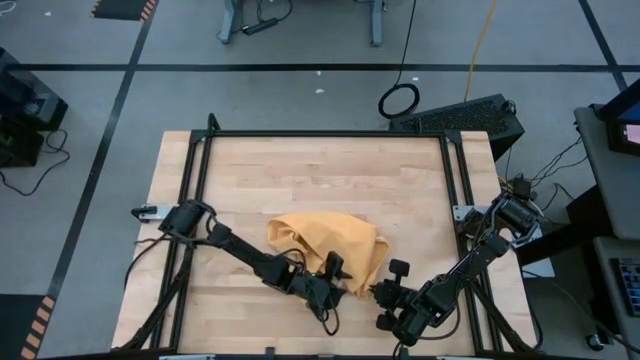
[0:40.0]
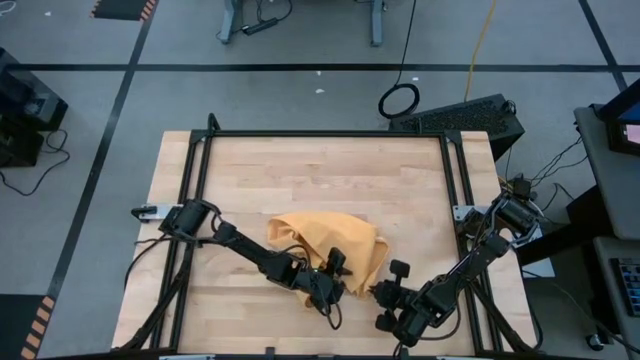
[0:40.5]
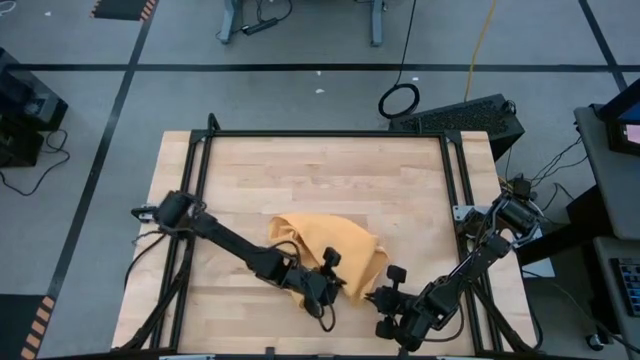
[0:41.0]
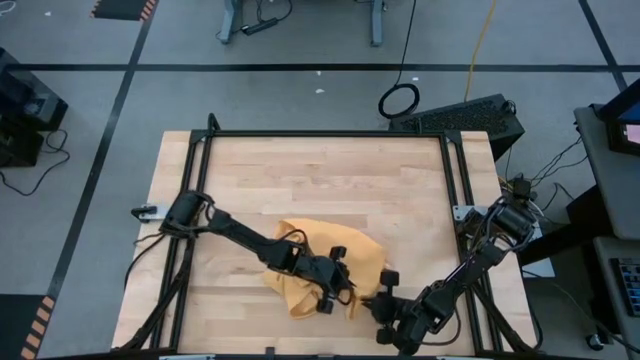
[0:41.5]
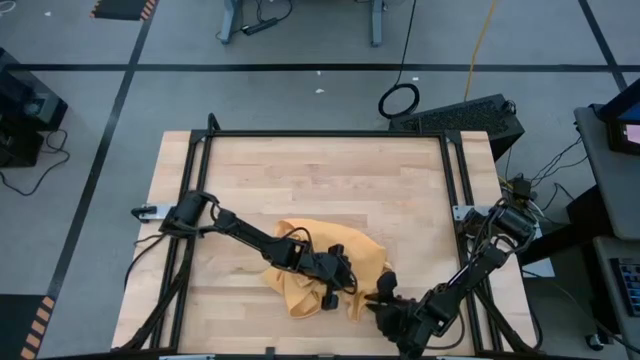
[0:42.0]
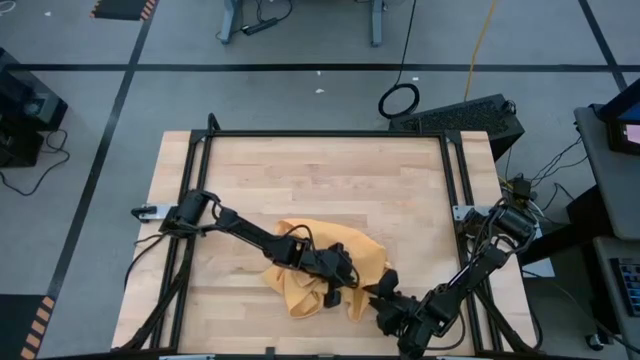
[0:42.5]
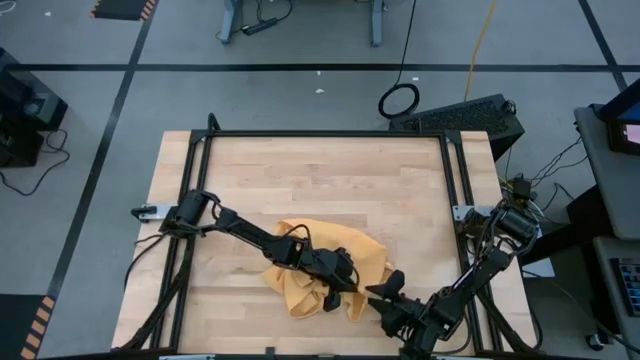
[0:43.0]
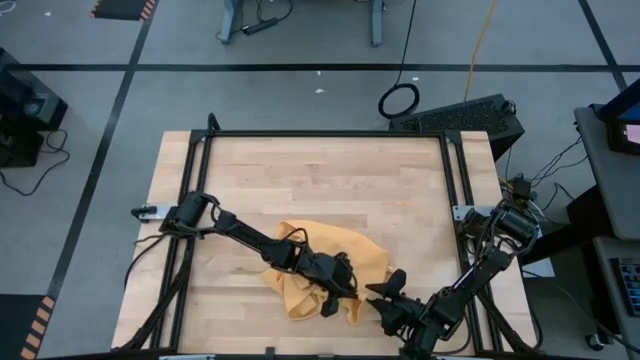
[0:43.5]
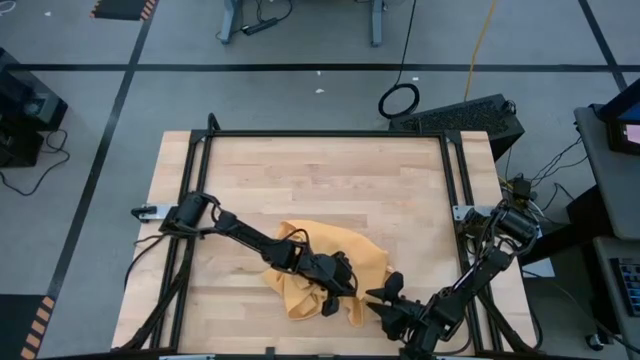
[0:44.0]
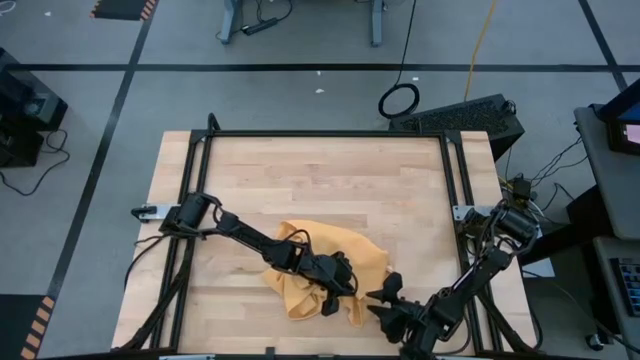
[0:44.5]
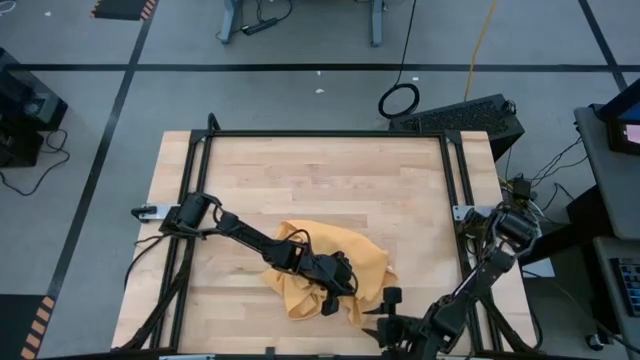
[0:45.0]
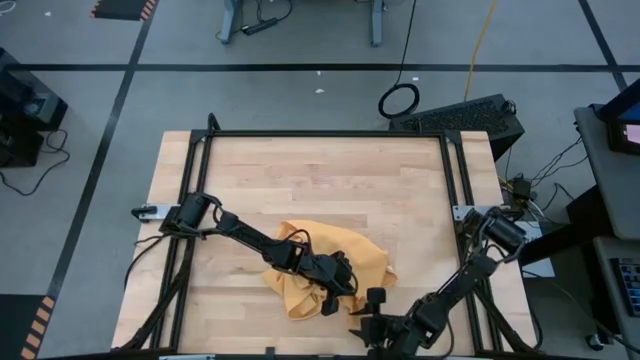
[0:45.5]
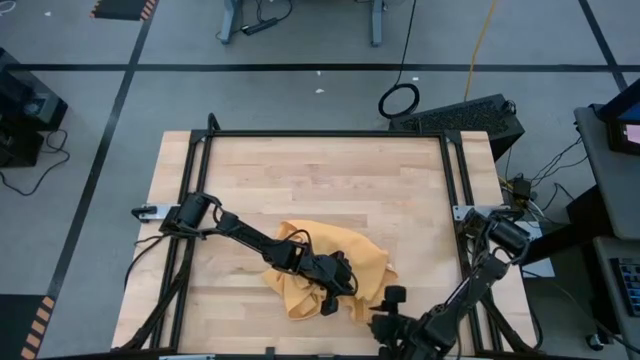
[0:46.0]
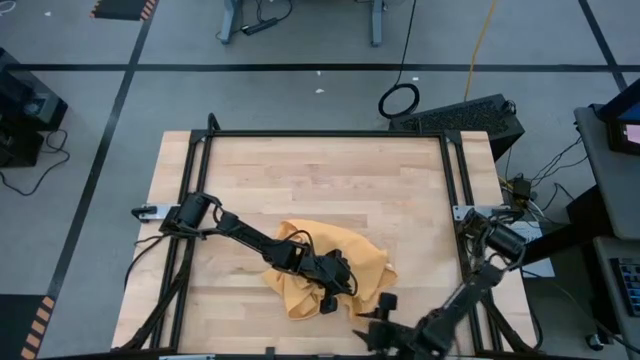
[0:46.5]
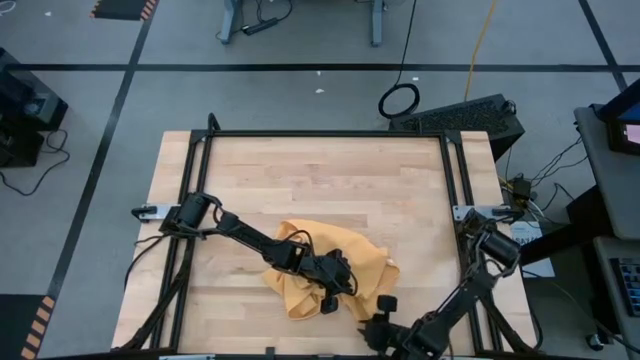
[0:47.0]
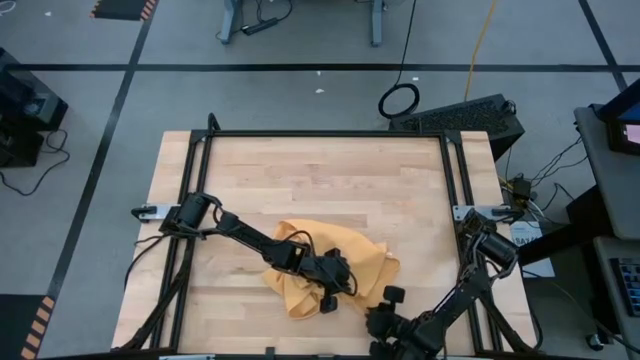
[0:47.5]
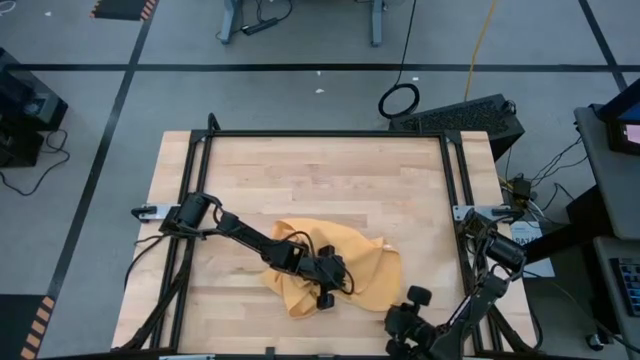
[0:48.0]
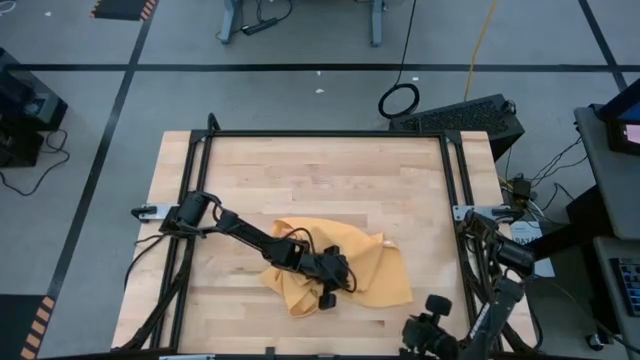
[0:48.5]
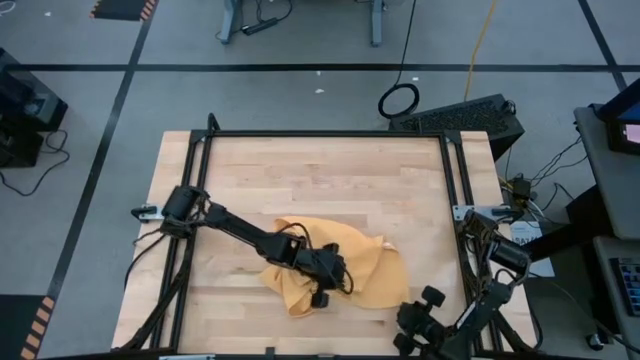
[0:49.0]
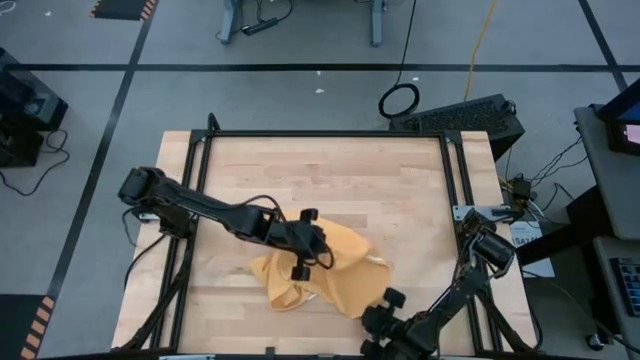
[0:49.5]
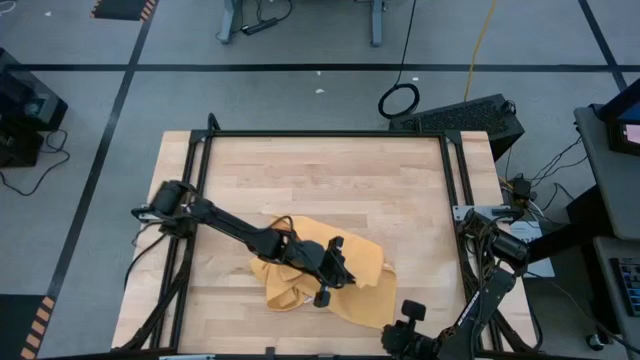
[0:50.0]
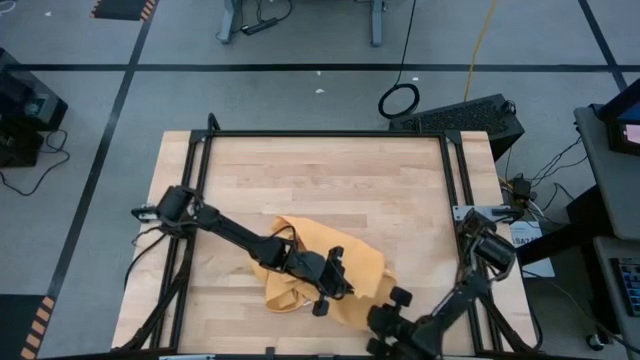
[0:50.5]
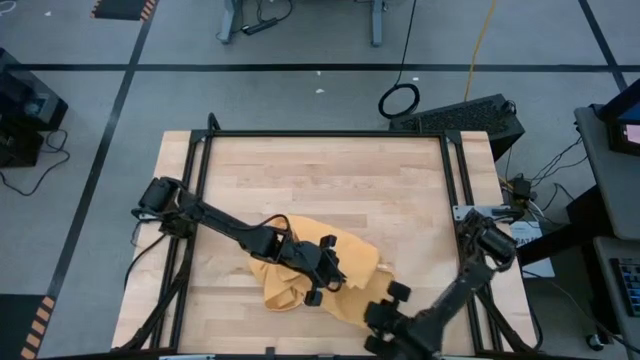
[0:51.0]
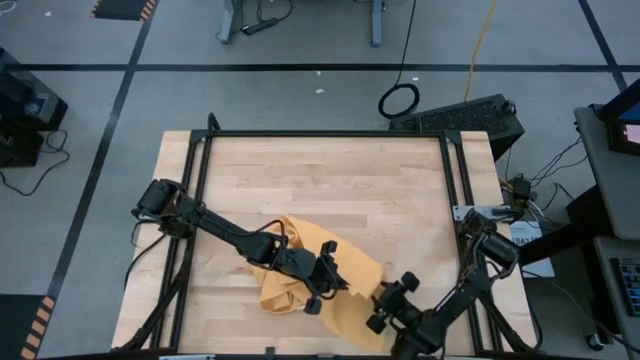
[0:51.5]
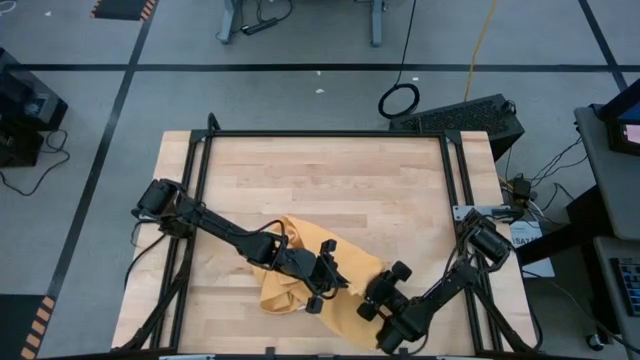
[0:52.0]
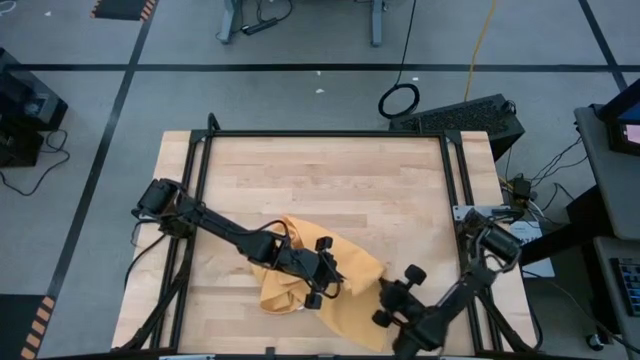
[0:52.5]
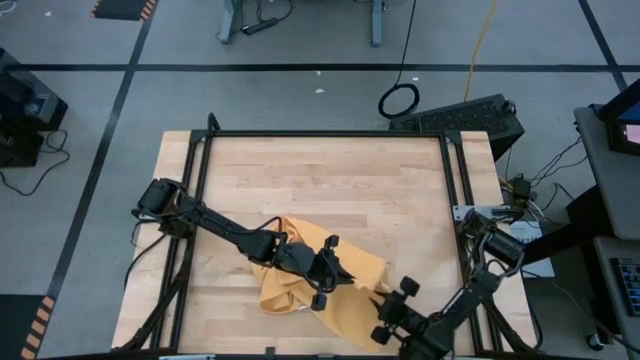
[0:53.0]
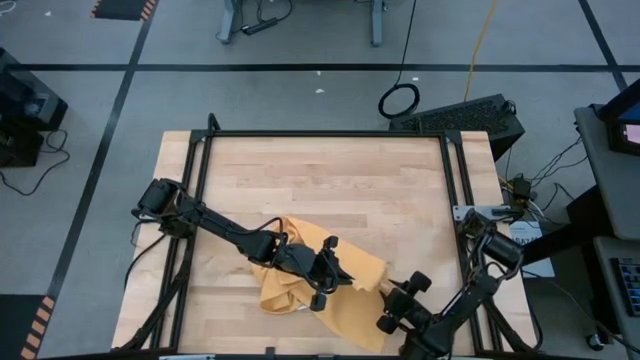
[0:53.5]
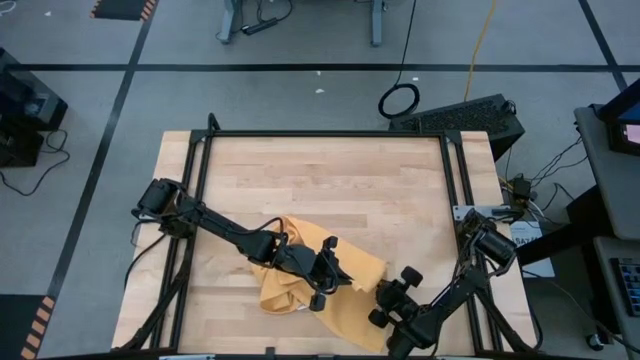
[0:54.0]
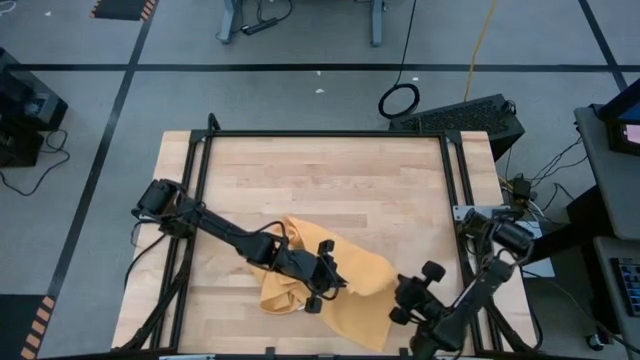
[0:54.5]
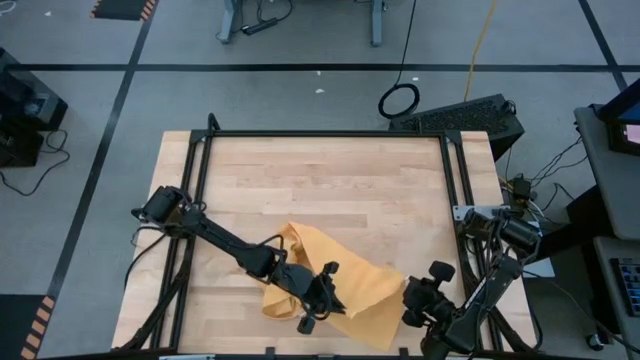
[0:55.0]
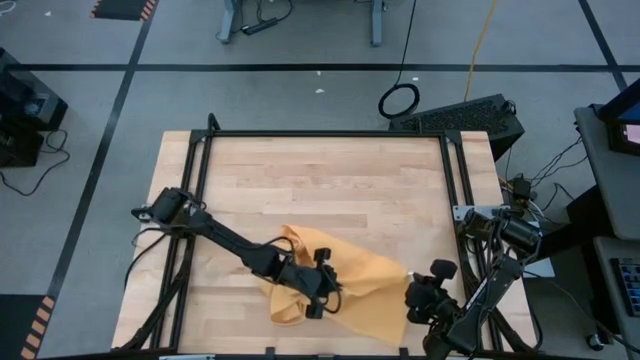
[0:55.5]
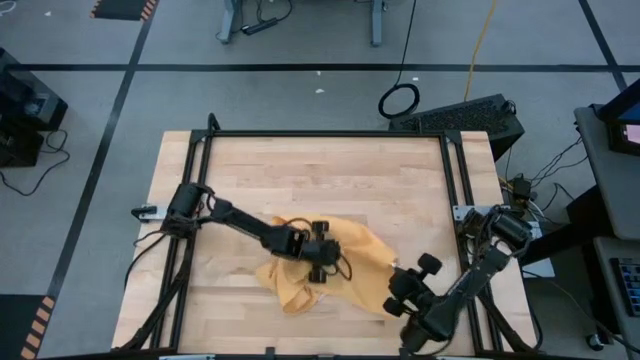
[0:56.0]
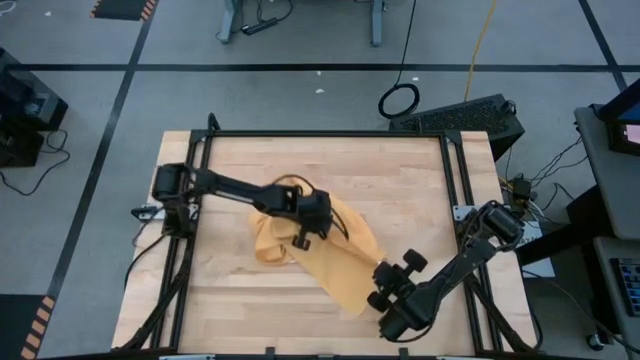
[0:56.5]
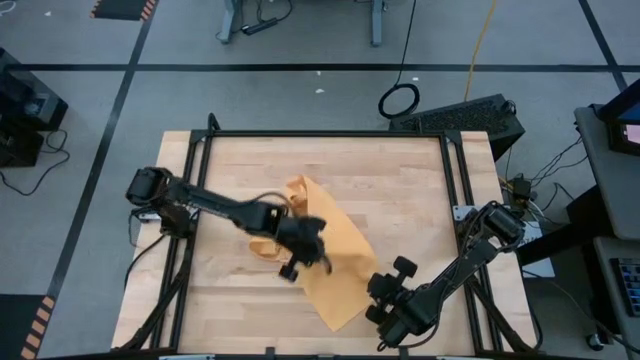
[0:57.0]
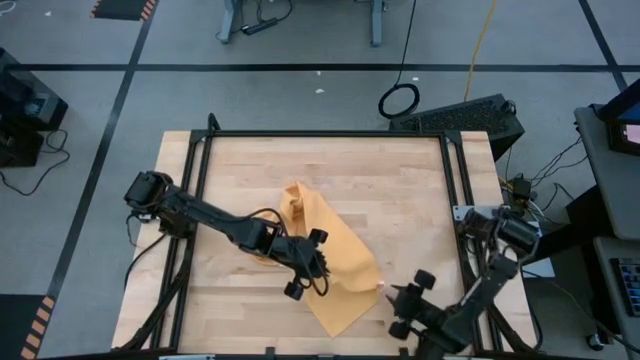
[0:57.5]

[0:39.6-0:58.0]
Task: Roll towel
Roll the yellow towel

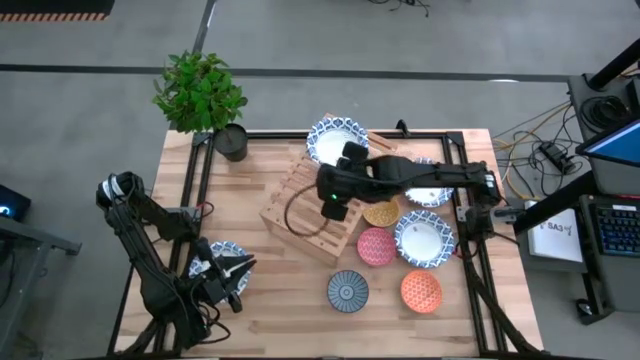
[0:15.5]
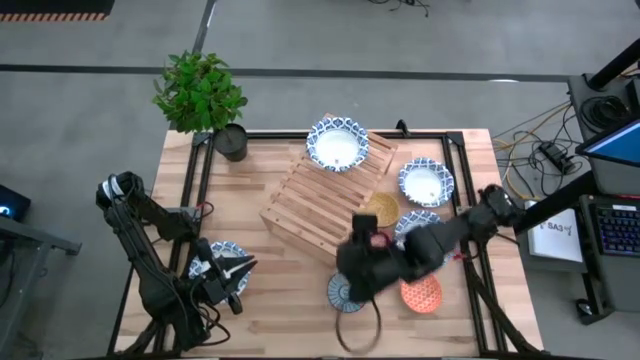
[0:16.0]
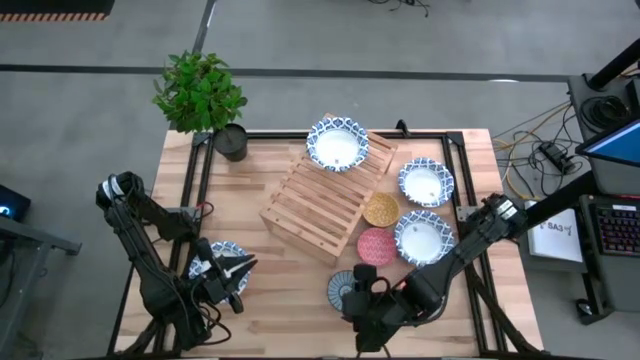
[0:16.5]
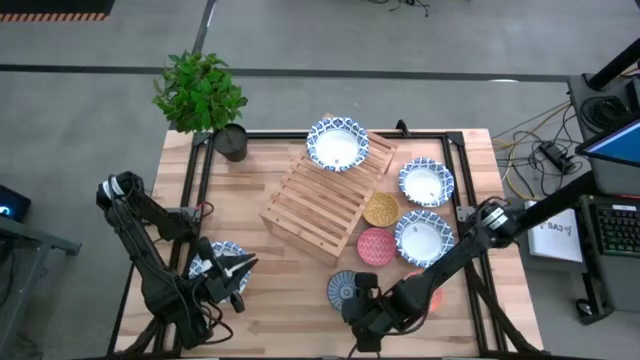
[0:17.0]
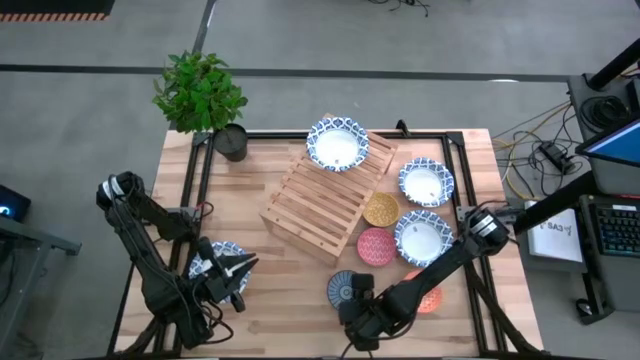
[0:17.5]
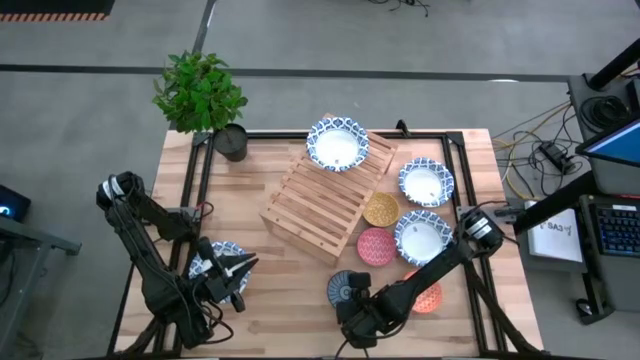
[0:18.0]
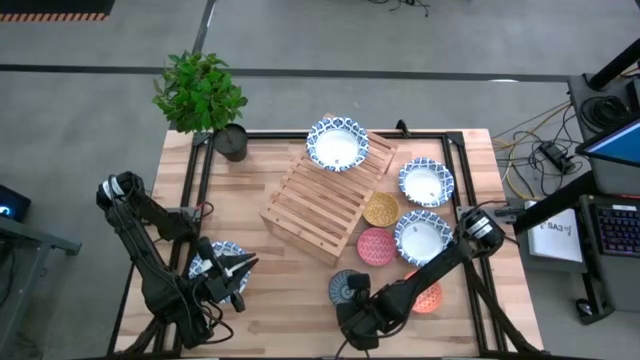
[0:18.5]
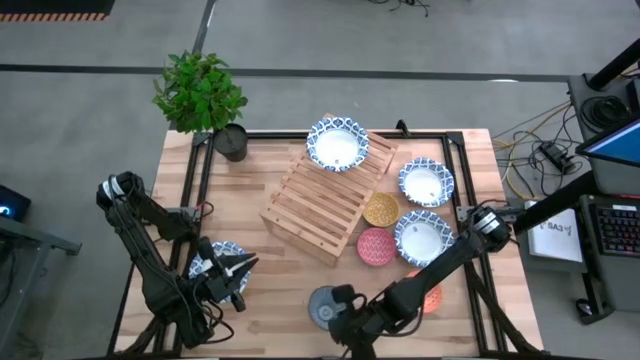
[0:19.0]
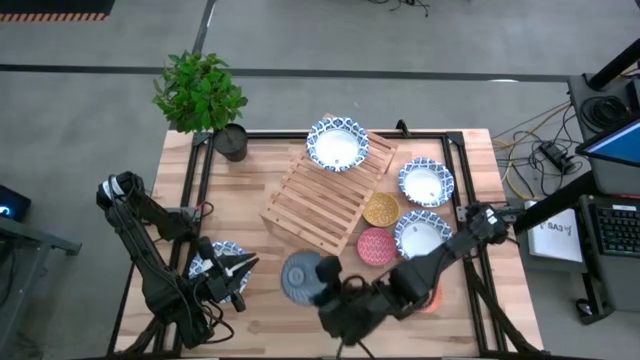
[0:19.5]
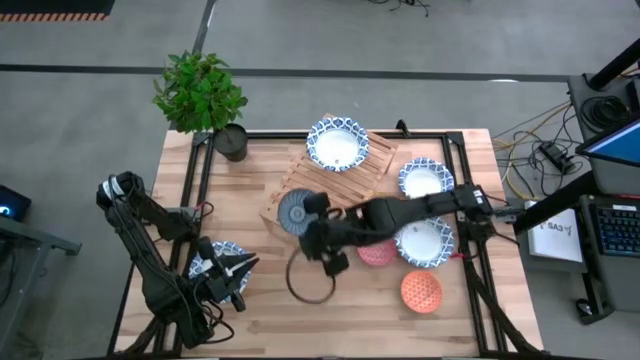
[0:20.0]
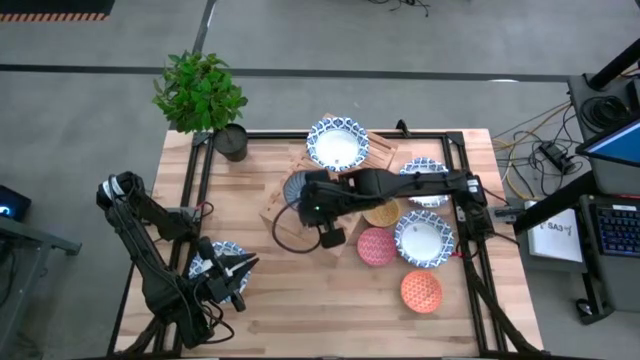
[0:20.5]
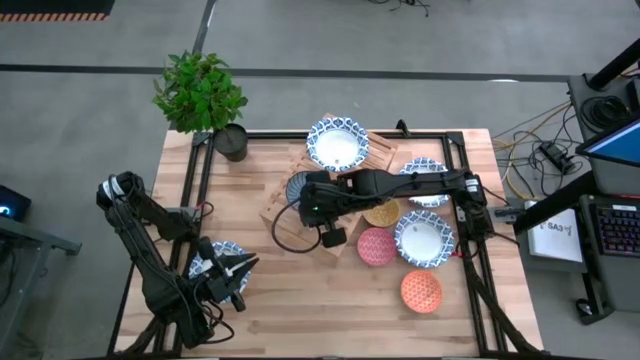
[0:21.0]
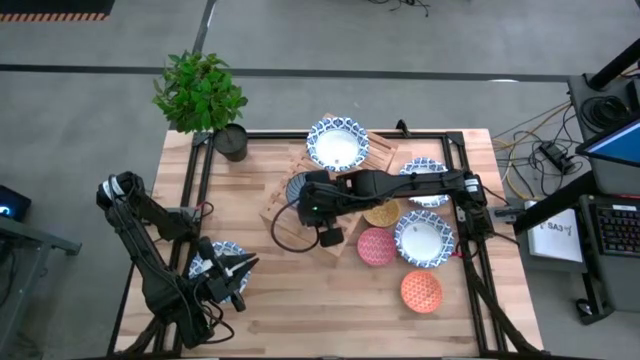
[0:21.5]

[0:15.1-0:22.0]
Task: Place and stack bowls onto a shelf
Put the blue patterned bowl on the shelf
